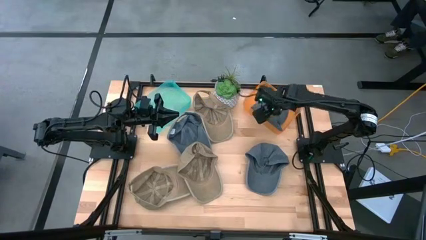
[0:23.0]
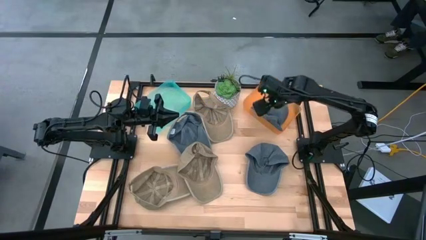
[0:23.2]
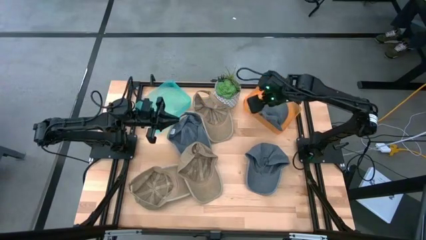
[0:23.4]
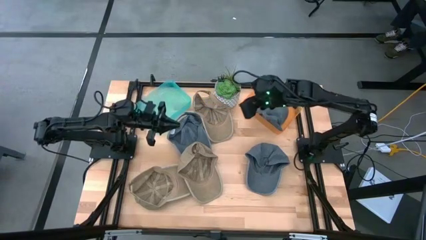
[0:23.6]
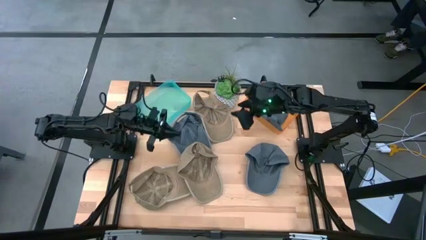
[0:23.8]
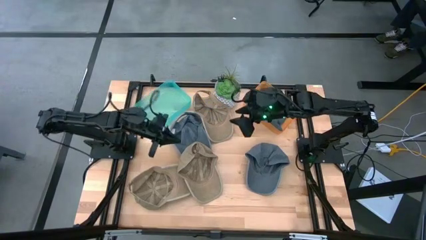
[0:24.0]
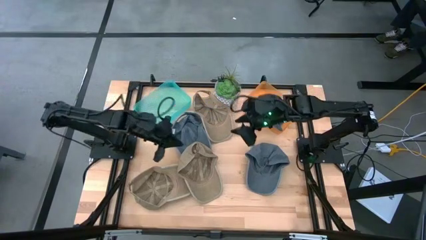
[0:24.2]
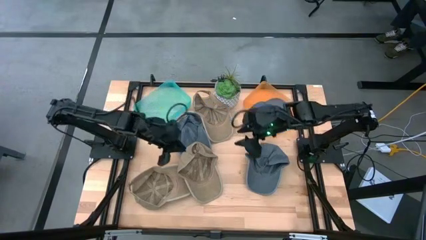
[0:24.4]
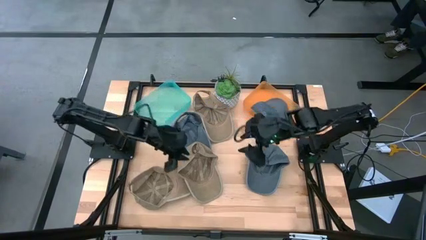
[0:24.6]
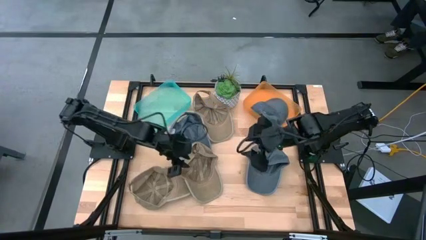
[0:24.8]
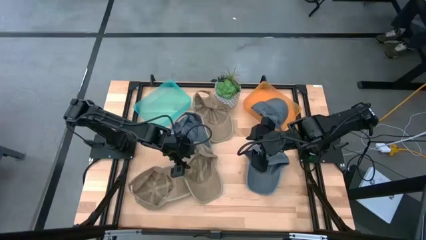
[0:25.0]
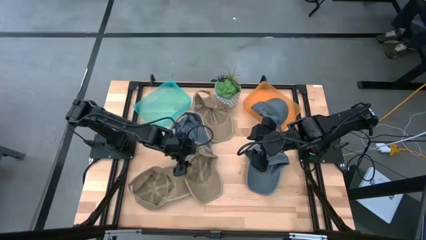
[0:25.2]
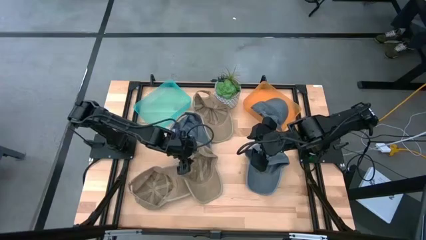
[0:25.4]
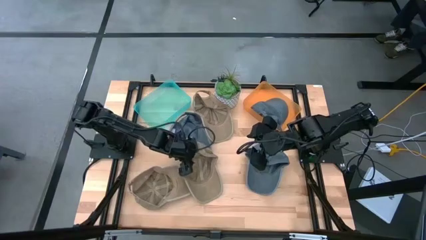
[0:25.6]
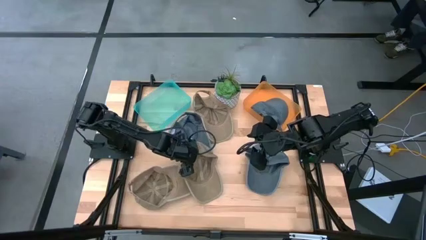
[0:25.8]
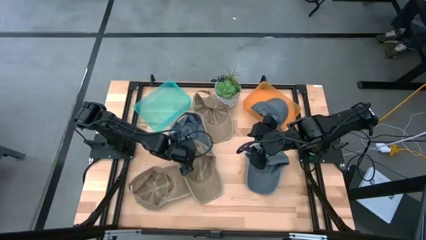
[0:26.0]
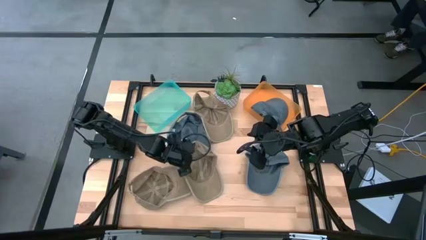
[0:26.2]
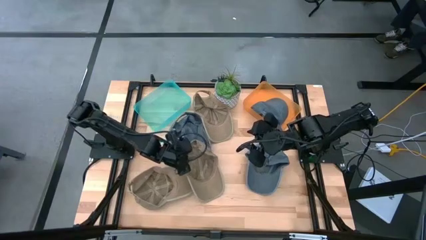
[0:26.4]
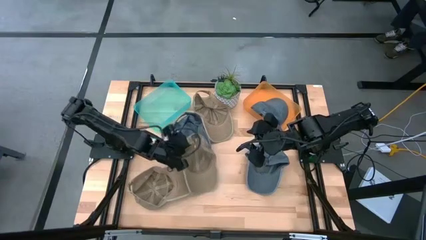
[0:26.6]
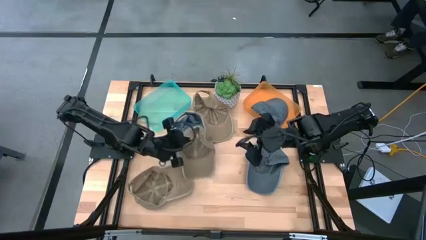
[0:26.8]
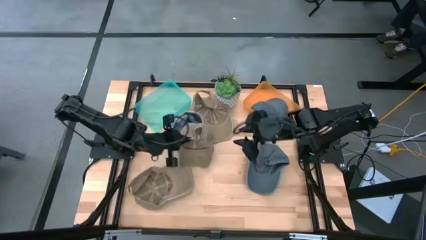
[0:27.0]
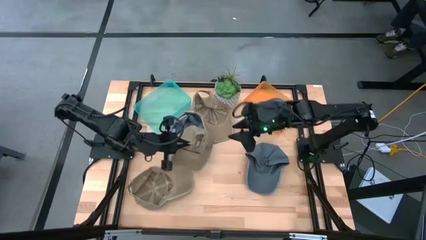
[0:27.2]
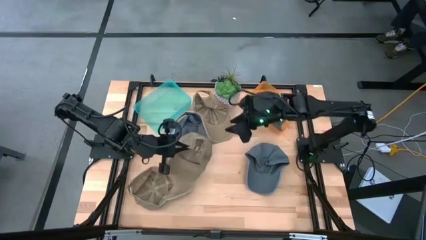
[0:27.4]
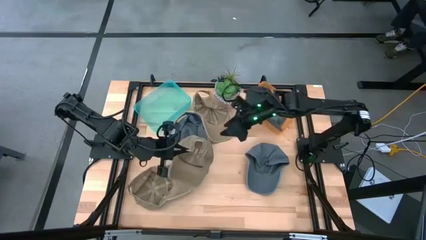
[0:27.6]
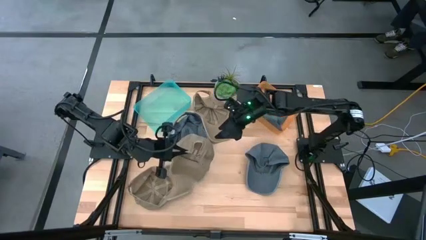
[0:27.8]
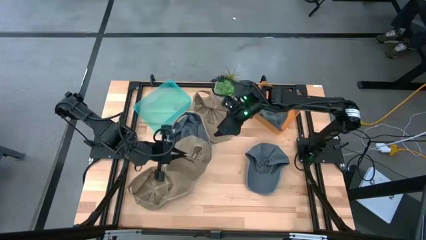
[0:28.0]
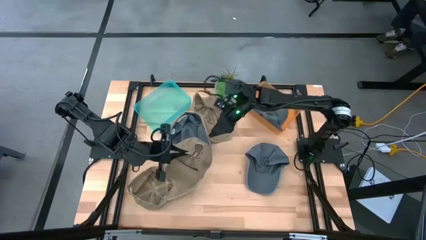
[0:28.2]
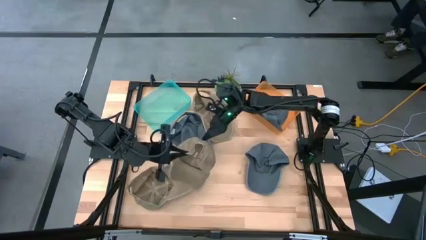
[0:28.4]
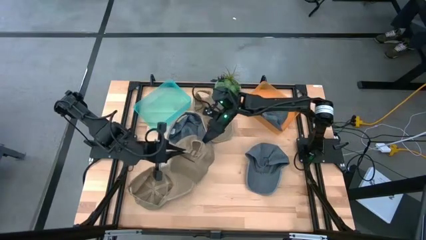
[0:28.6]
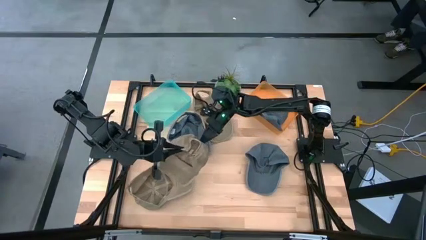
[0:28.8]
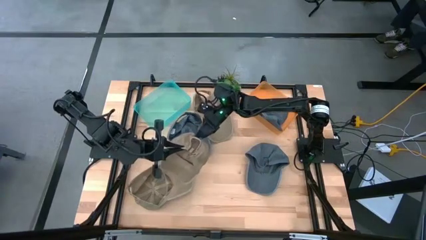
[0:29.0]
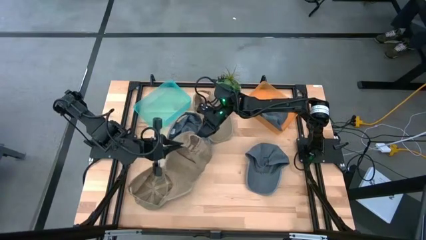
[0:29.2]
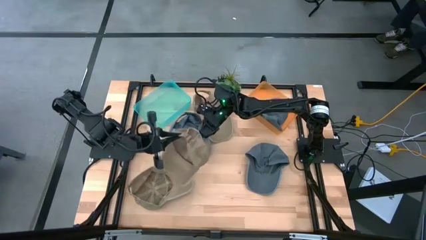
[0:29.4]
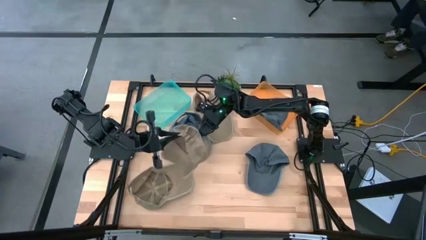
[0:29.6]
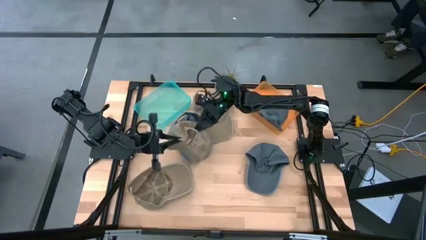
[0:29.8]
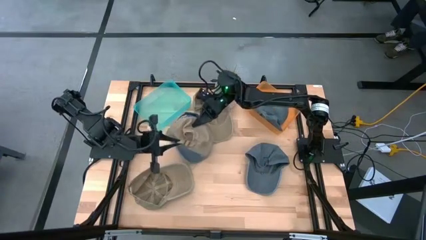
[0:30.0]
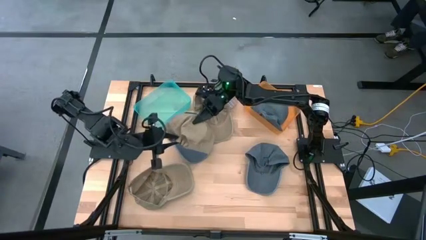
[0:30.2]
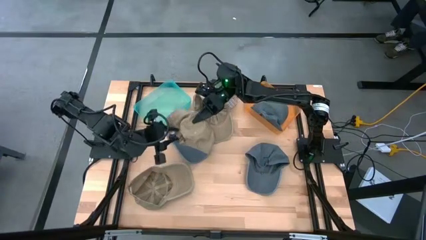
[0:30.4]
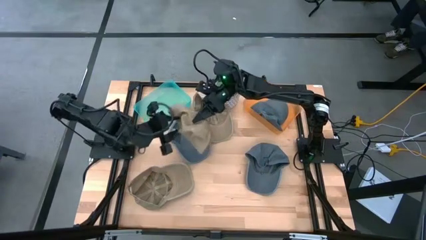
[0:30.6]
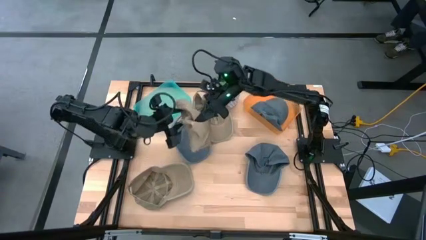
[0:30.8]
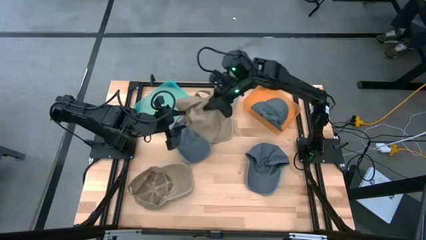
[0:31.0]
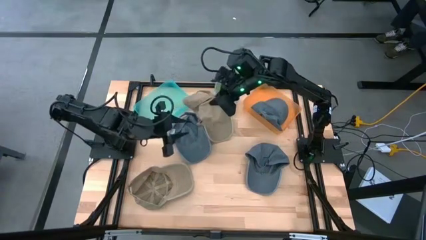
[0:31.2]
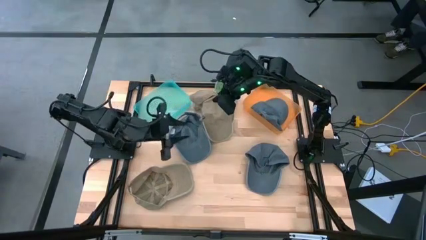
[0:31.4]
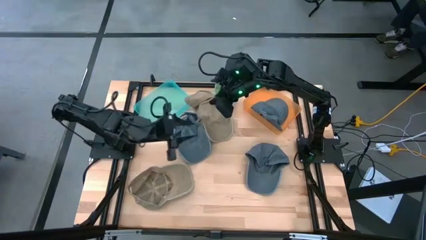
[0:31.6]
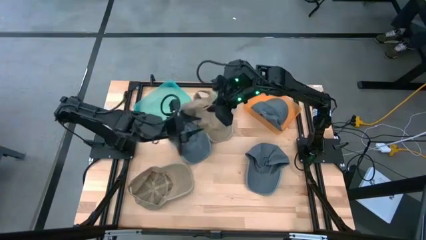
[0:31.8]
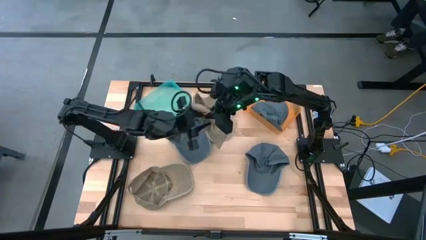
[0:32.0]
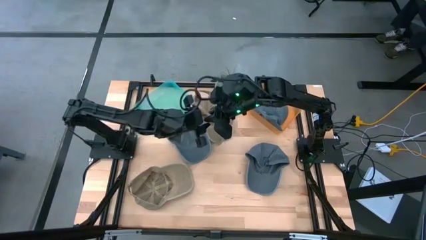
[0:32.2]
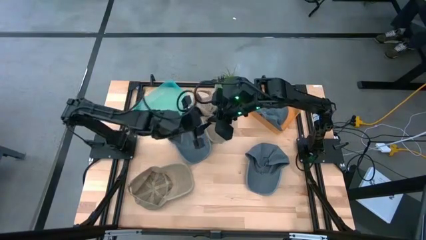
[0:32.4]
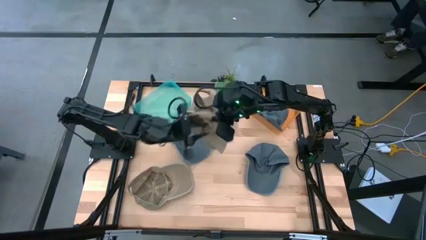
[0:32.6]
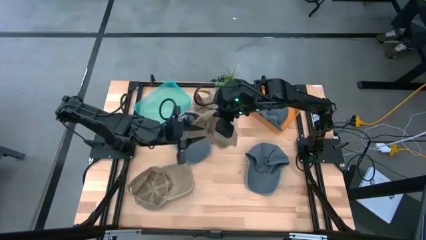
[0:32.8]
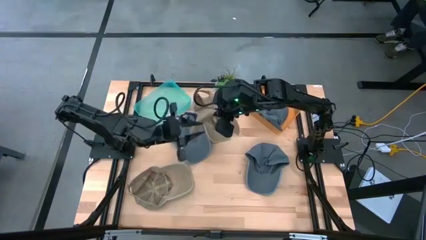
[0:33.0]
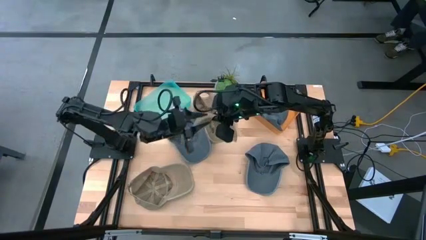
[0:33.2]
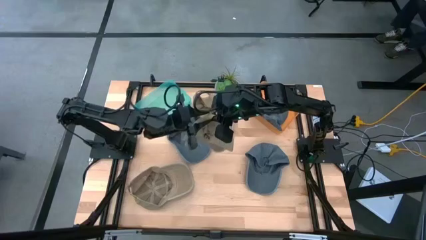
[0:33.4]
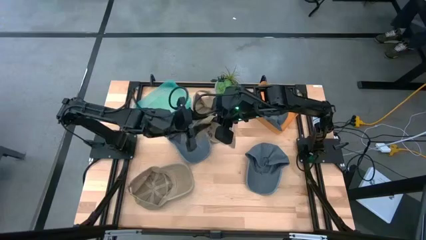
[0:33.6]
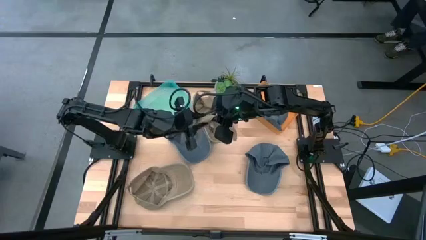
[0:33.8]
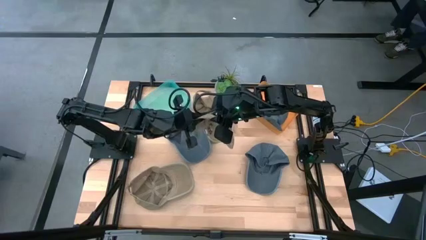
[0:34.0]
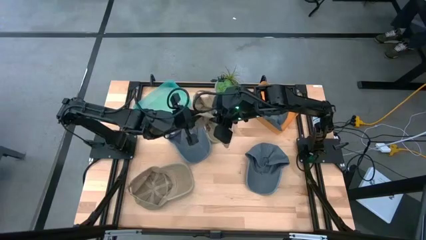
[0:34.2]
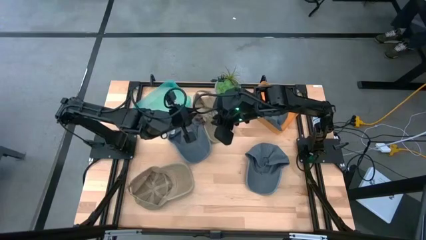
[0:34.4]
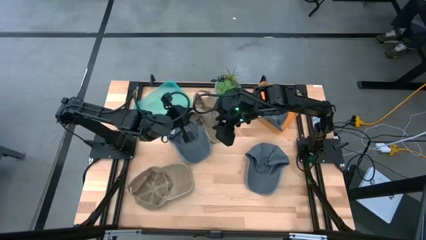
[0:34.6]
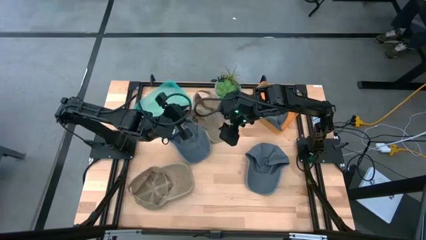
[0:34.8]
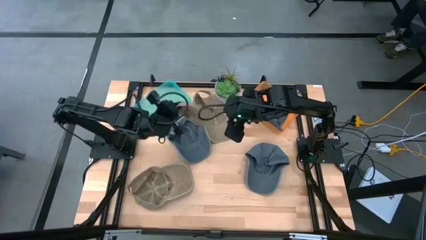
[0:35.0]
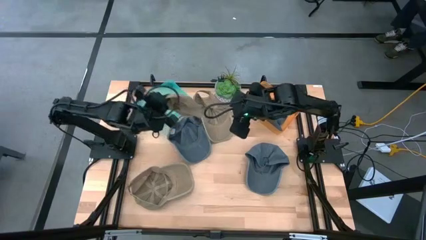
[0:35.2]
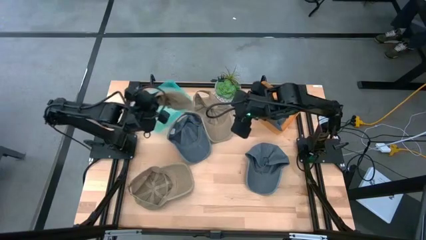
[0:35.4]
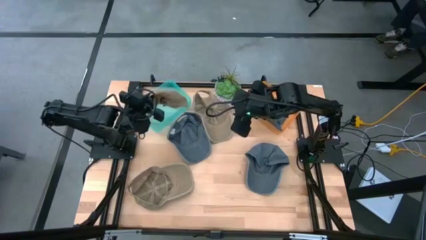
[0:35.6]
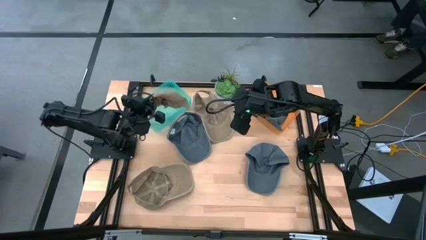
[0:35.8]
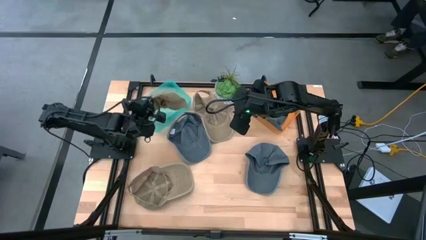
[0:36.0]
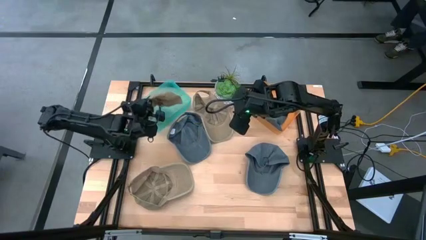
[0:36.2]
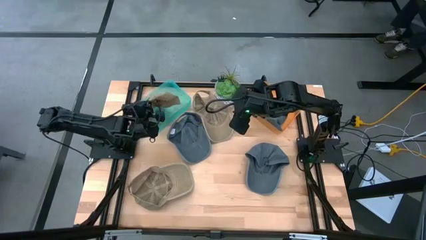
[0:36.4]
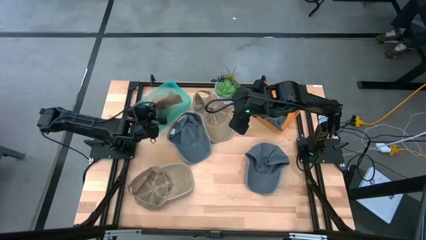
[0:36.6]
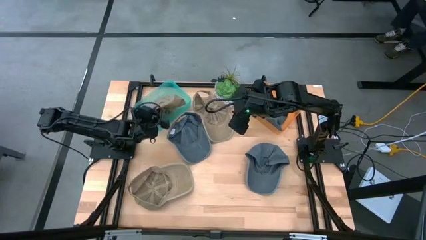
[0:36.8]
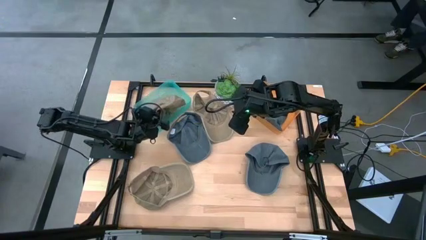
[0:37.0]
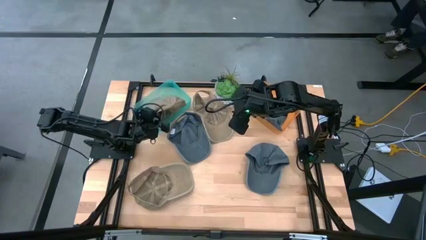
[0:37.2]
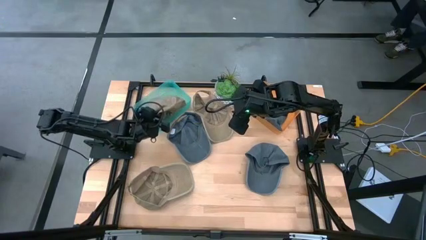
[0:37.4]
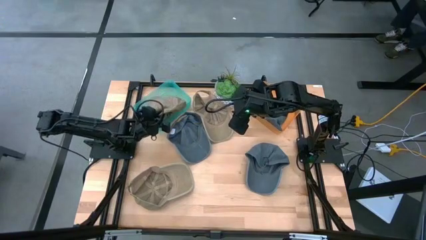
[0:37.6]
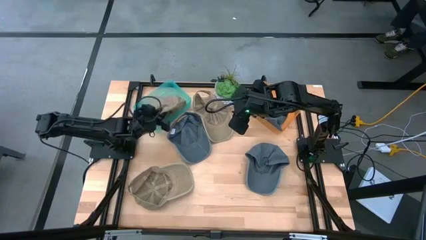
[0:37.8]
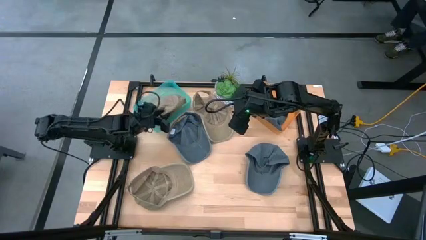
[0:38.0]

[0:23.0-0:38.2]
Task: Pick & Place hat
Put the bottom right brown cap into the green bin
